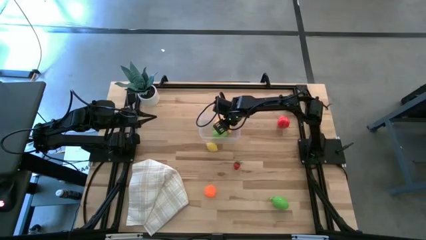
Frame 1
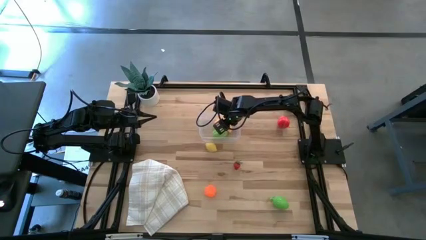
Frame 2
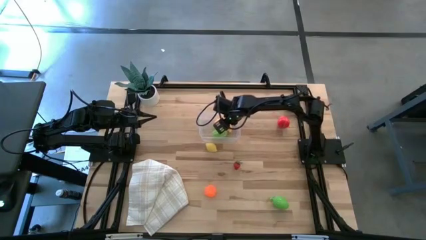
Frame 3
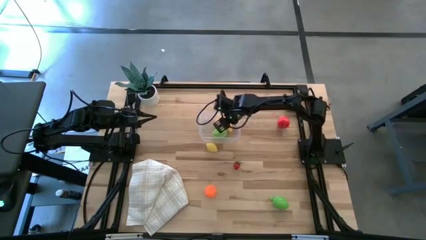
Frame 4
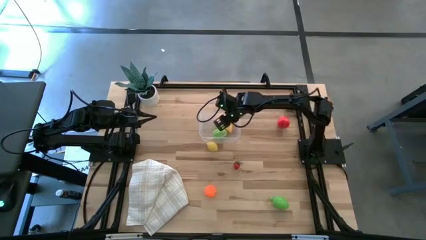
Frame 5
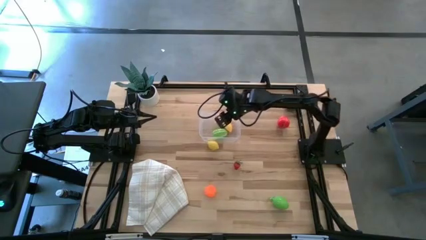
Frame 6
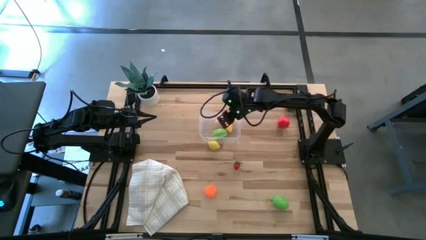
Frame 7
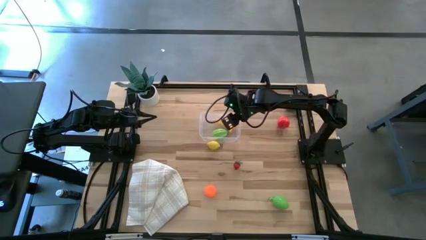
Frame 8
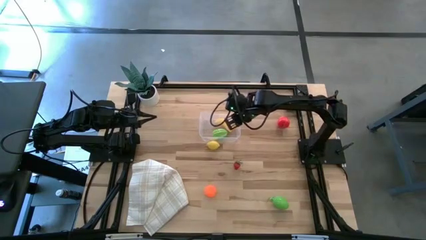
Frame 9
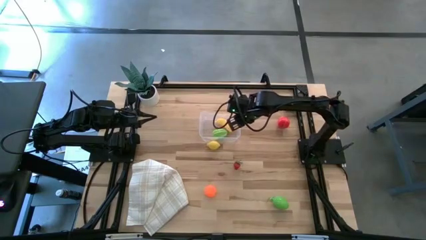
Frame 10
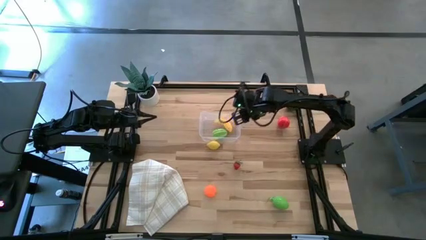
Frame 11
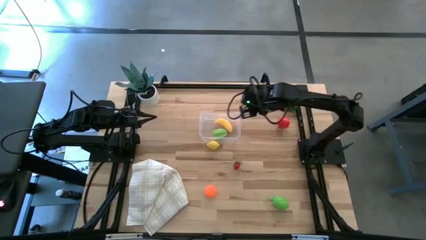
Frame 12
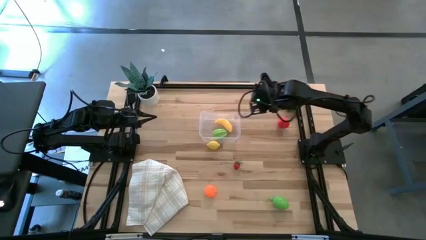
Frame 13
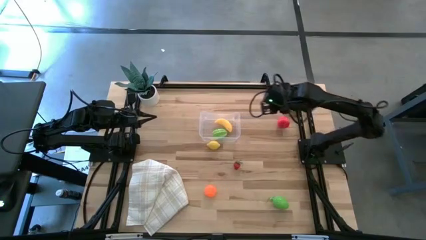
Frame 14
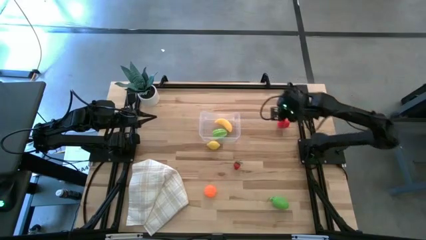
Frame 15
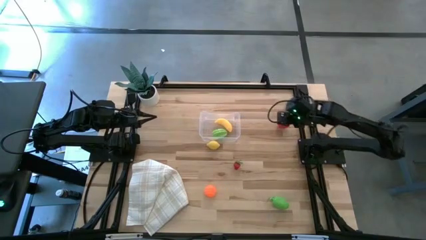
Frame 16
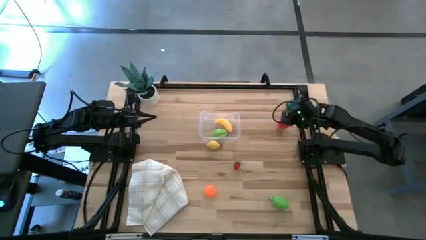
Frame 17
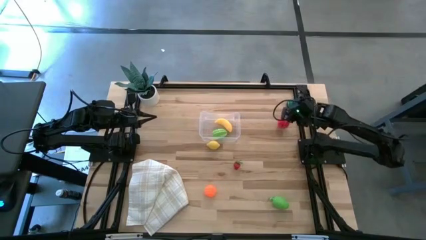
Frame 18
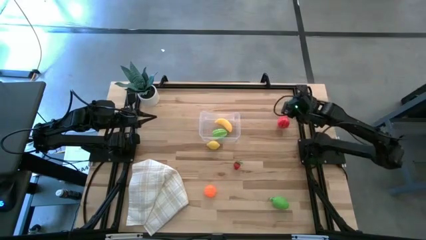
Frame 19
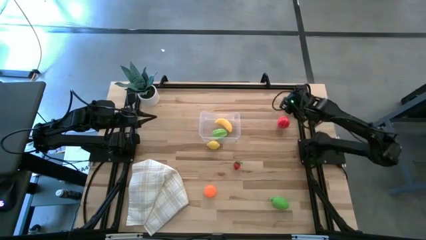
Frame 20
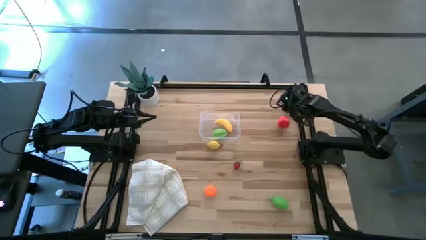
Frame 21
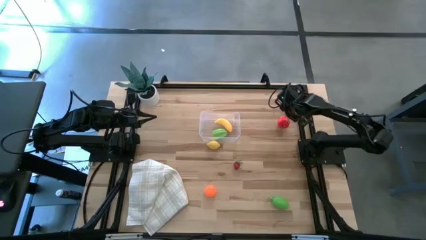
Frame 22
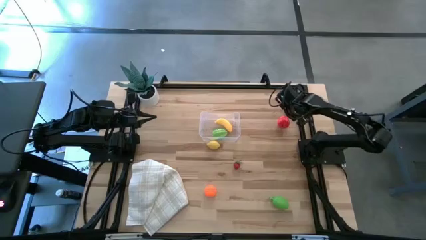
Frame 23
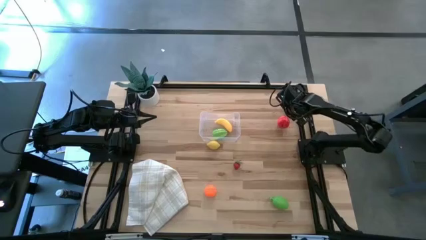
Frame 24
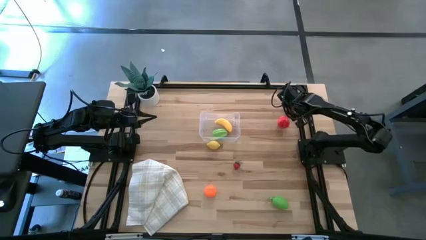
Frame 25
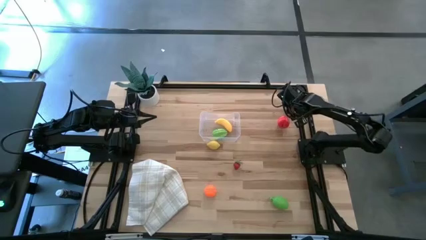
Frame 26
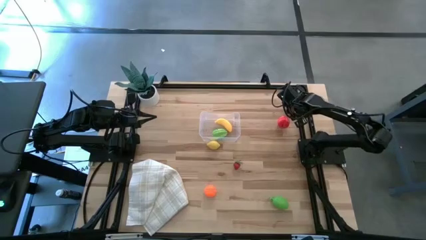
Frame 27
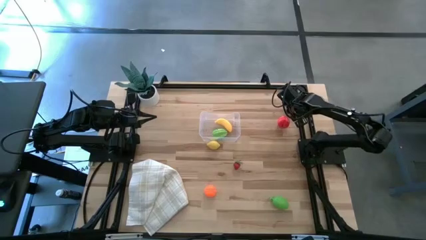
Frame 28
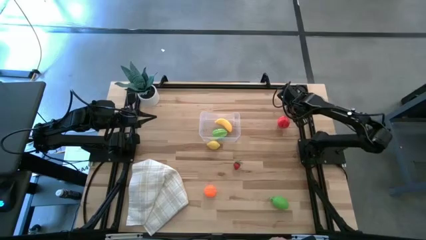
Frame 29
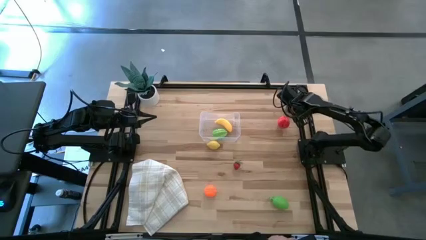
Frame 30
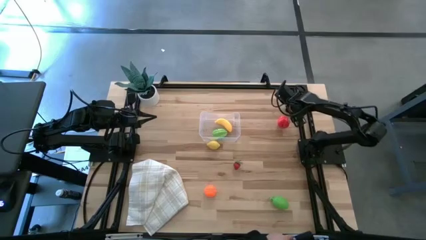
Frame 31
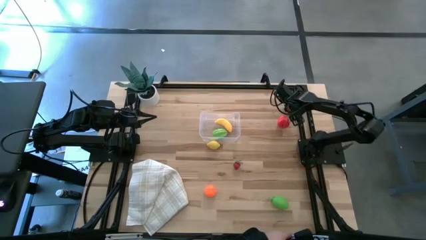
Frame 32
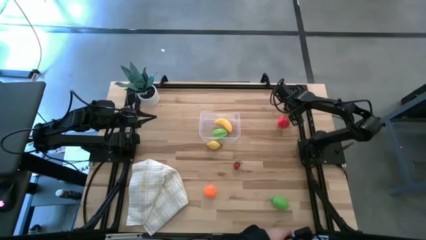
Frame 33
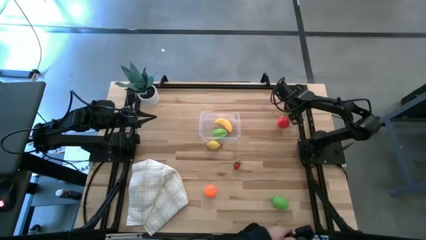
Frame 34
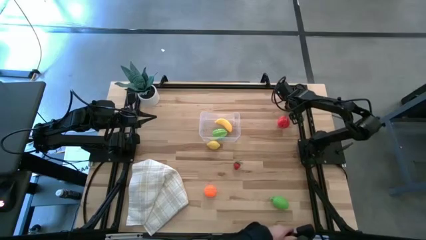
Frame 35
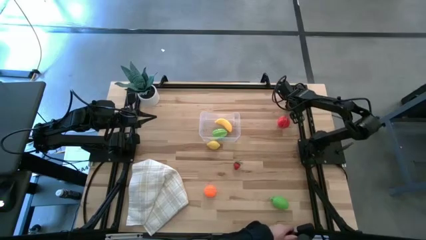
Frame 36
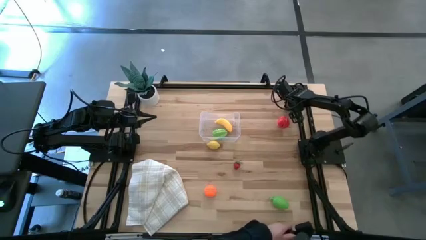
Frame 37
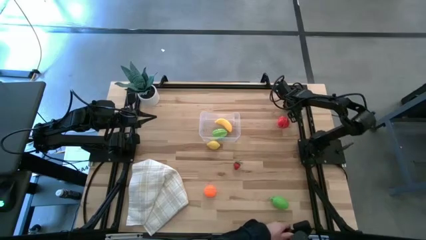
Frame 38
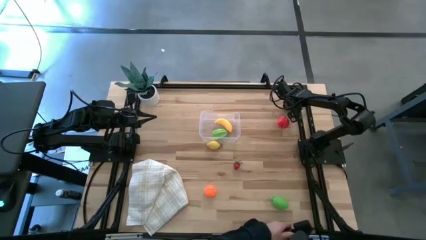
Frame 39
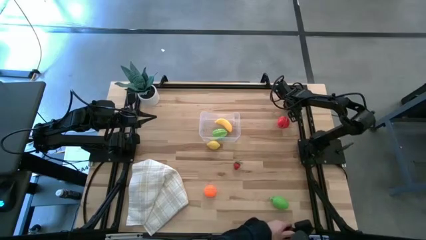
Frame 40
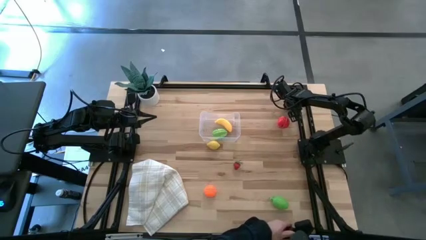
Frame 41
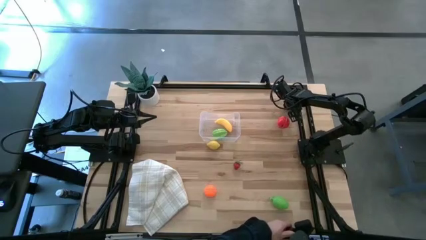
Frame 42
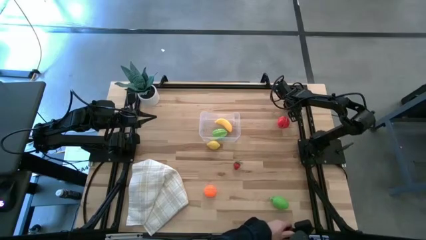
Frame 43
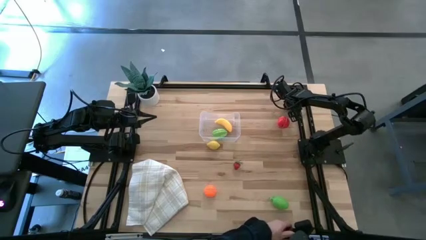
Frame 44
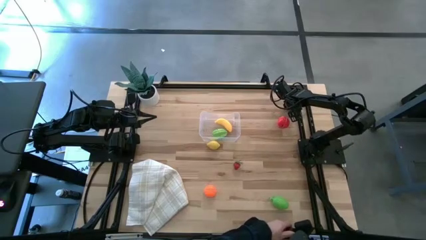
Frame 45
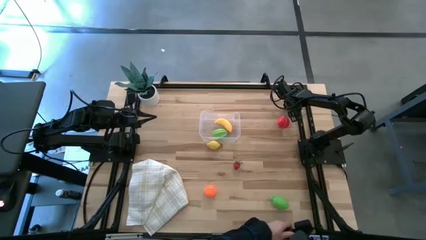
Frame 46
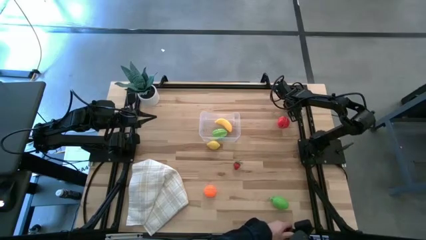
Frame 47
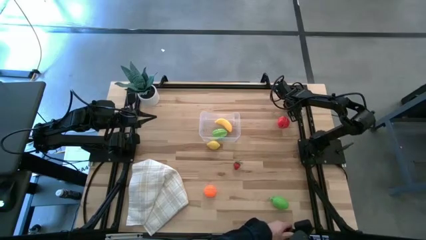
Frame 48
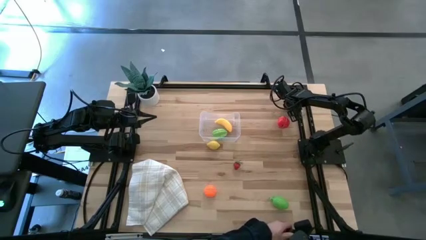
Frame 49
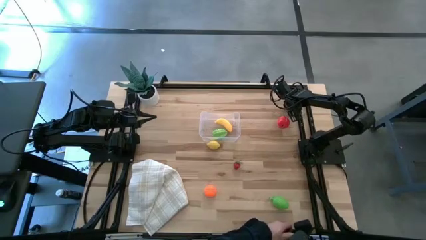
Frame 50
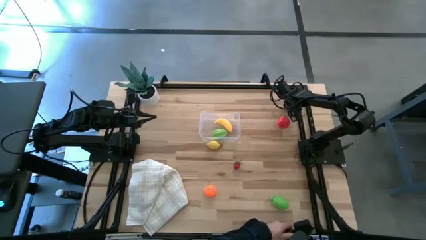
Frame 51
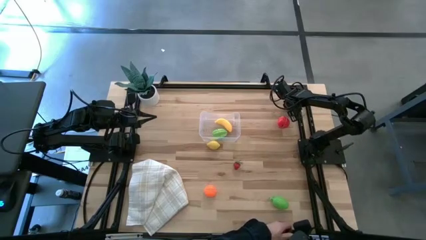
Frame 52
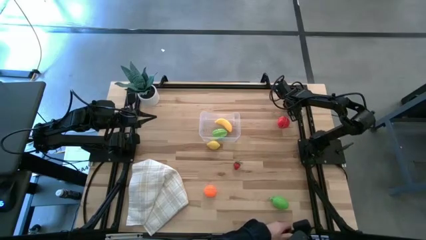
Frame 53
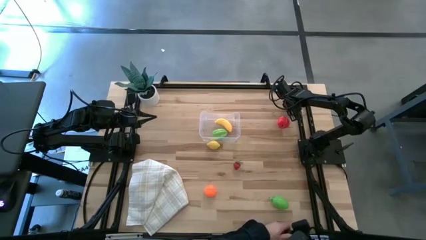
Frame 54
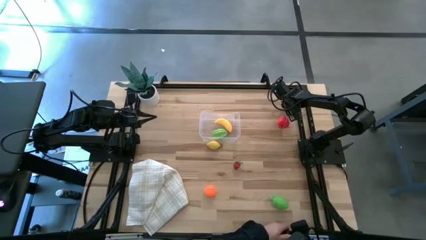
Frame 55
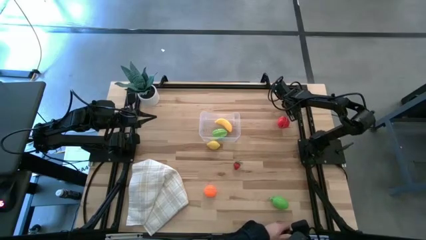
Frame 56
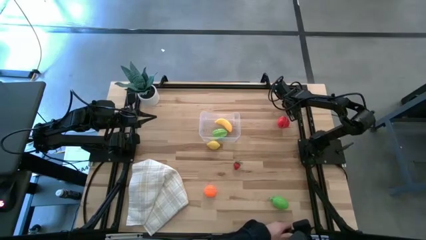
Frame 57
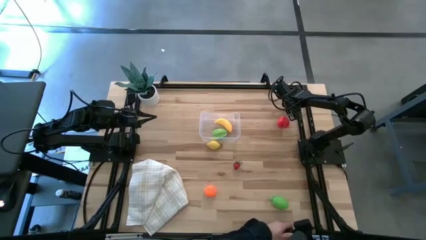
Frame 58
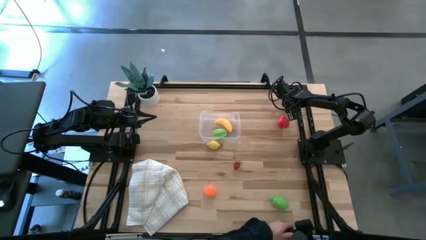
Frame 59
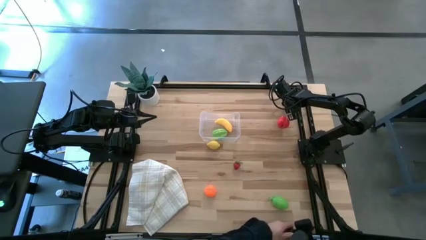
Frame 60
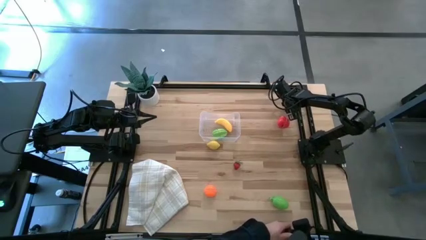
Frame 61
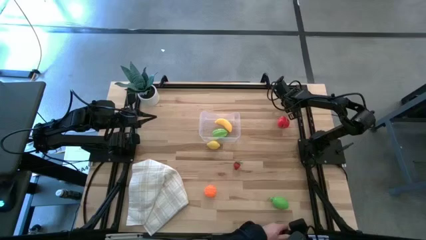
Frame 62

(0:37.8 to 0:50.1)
Task: Pick and placing Produce into tupperware
Put the watermelon into the transparent bin
